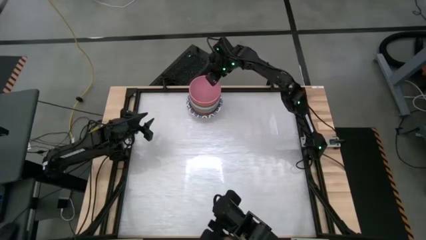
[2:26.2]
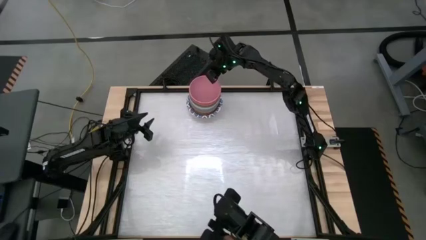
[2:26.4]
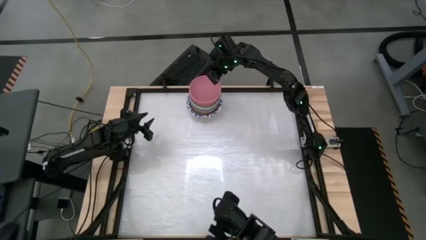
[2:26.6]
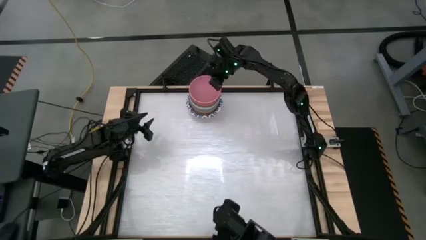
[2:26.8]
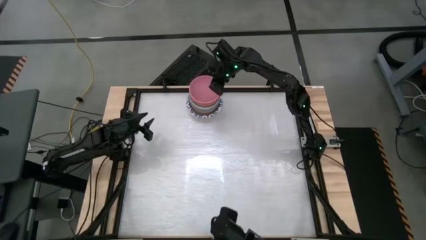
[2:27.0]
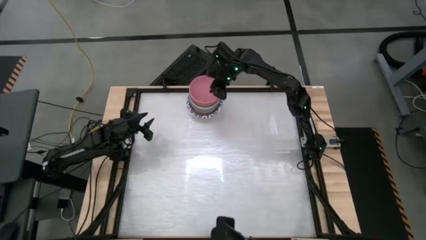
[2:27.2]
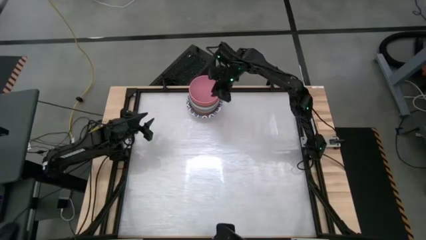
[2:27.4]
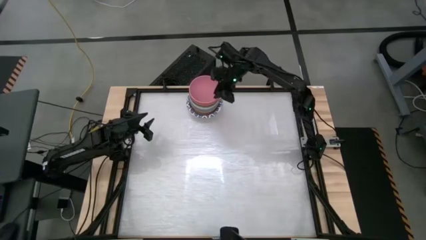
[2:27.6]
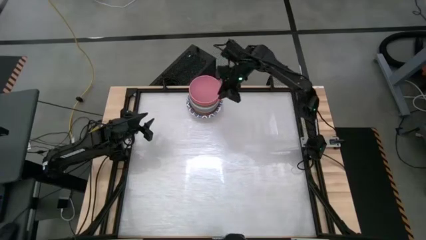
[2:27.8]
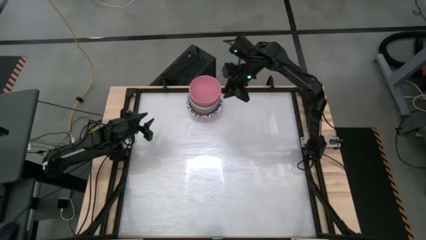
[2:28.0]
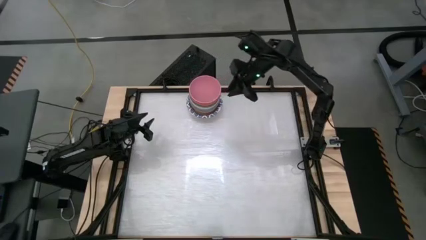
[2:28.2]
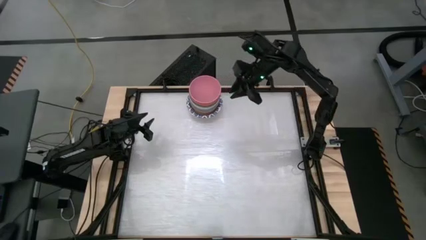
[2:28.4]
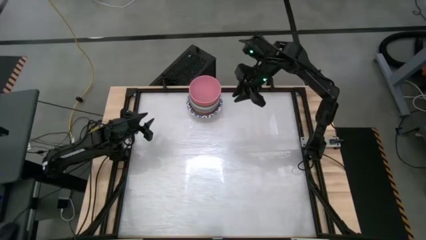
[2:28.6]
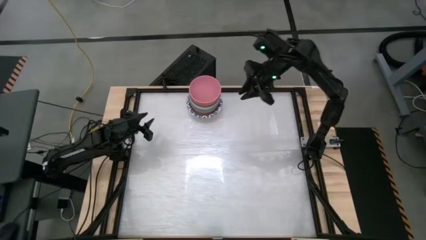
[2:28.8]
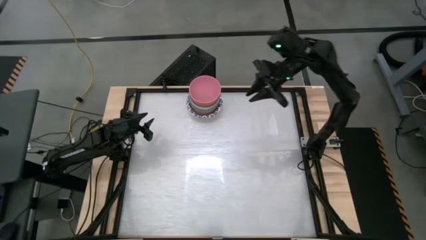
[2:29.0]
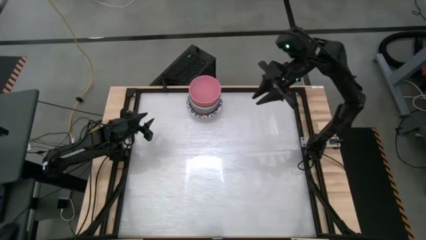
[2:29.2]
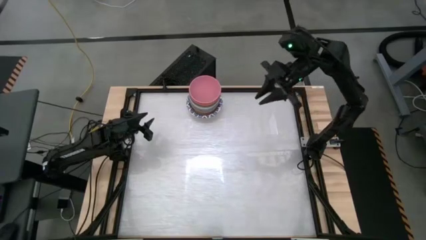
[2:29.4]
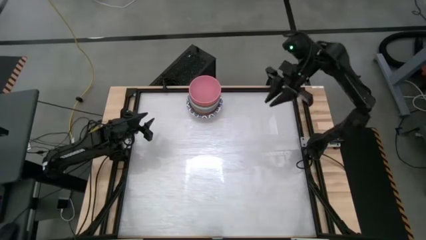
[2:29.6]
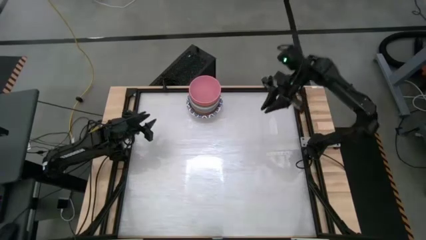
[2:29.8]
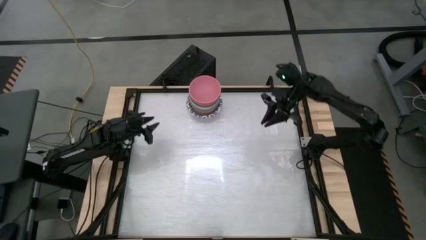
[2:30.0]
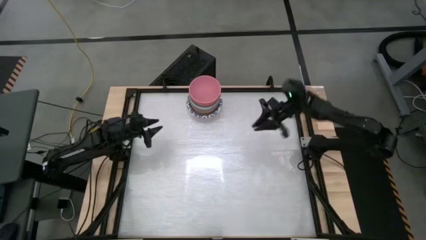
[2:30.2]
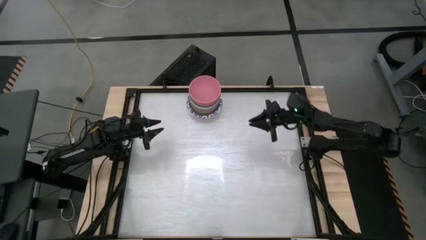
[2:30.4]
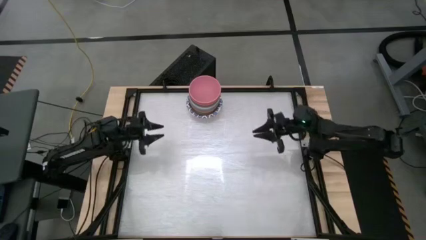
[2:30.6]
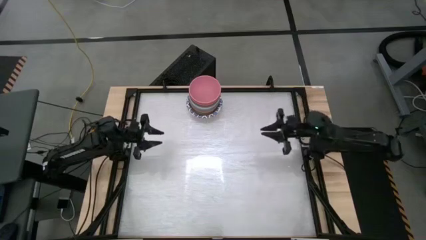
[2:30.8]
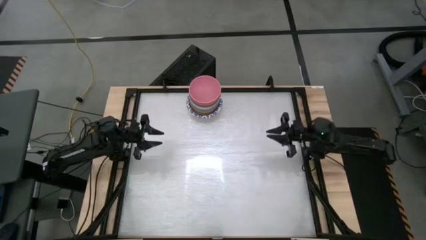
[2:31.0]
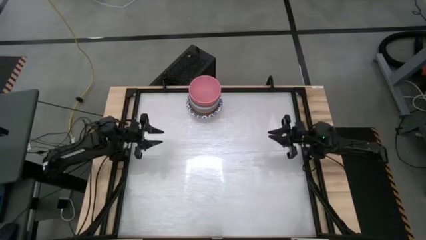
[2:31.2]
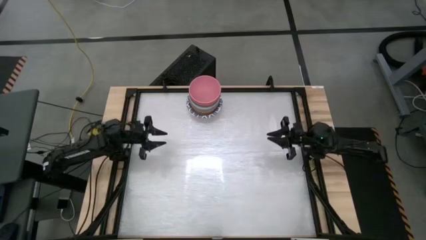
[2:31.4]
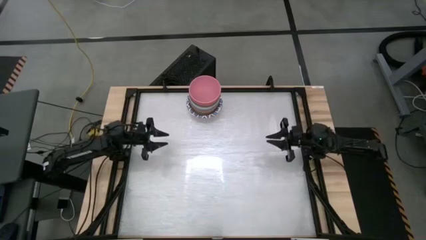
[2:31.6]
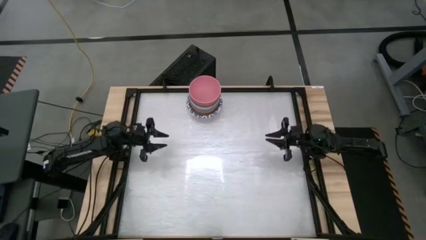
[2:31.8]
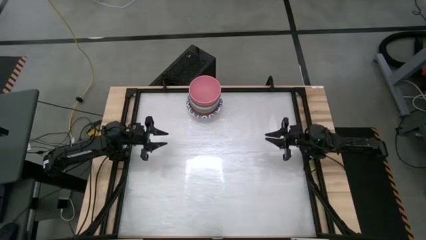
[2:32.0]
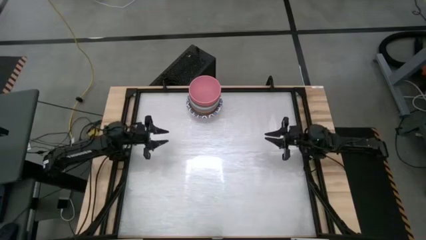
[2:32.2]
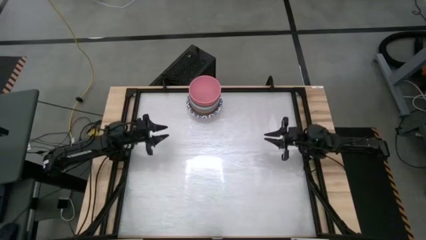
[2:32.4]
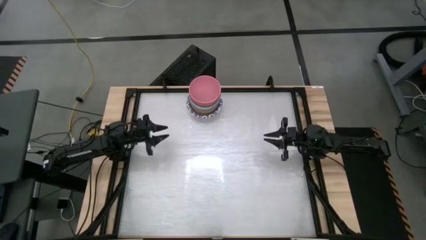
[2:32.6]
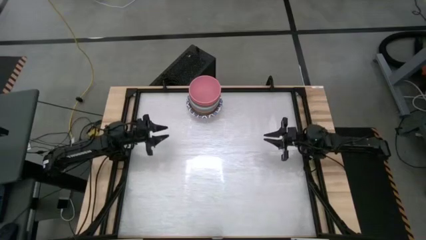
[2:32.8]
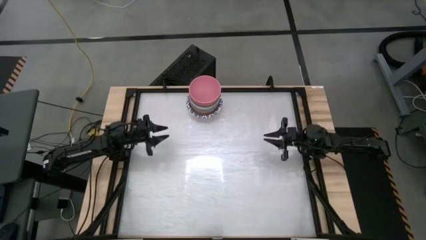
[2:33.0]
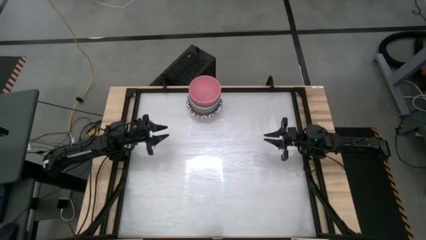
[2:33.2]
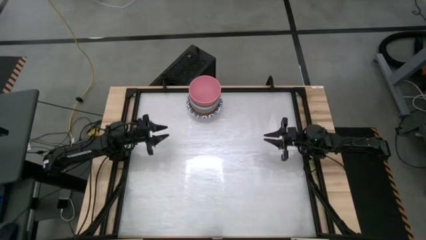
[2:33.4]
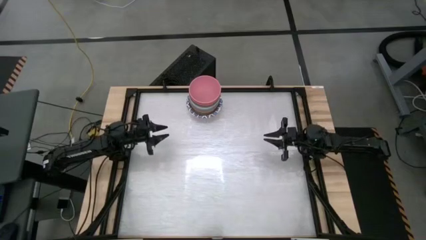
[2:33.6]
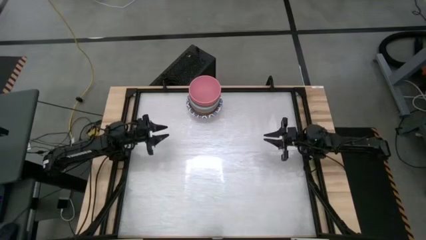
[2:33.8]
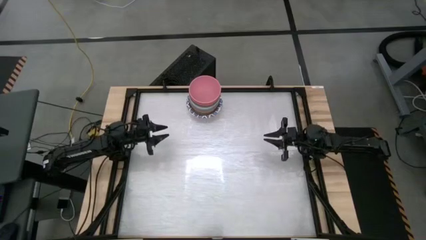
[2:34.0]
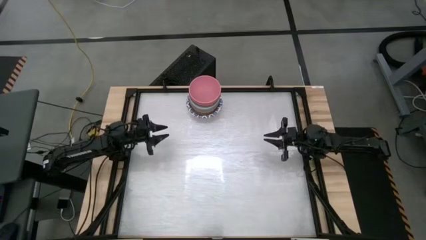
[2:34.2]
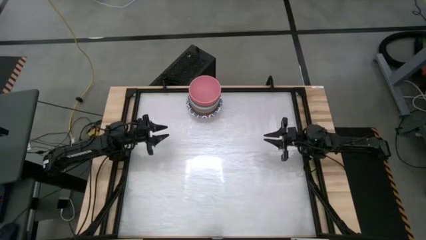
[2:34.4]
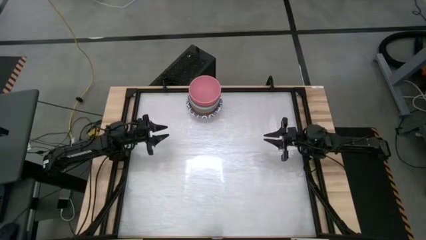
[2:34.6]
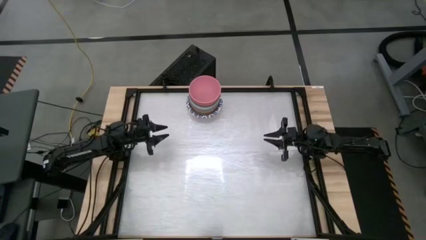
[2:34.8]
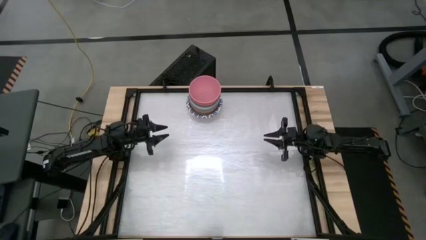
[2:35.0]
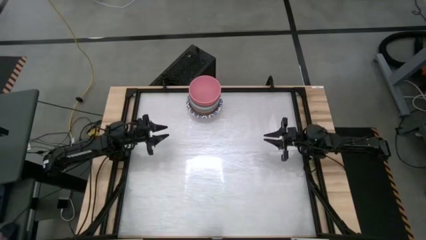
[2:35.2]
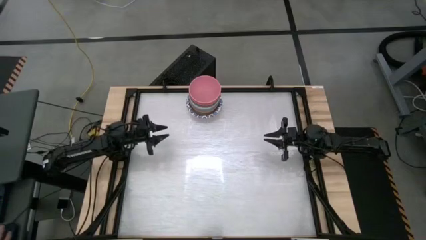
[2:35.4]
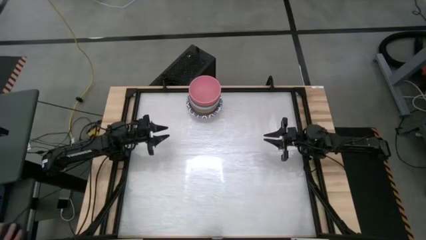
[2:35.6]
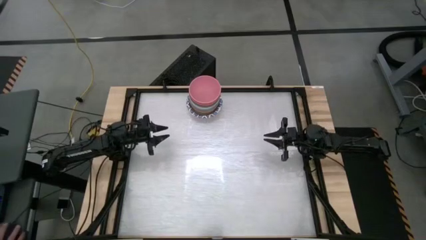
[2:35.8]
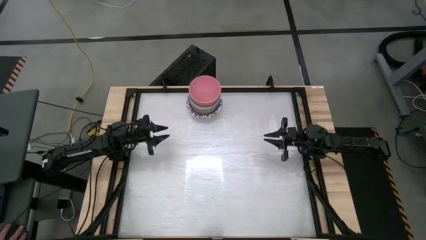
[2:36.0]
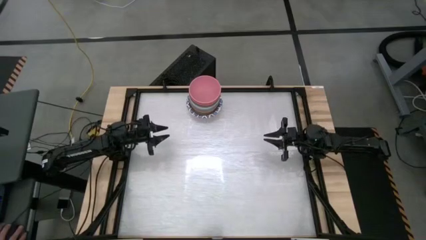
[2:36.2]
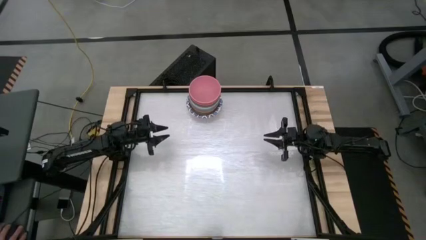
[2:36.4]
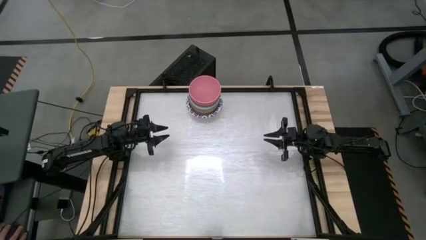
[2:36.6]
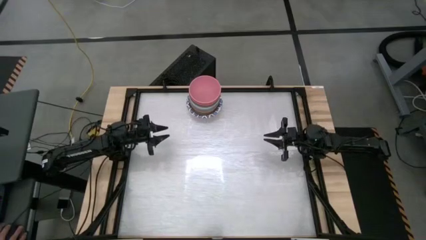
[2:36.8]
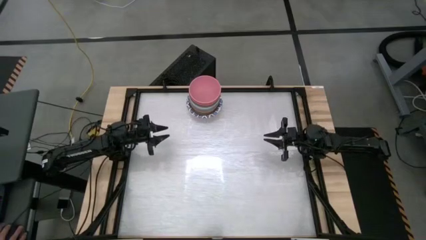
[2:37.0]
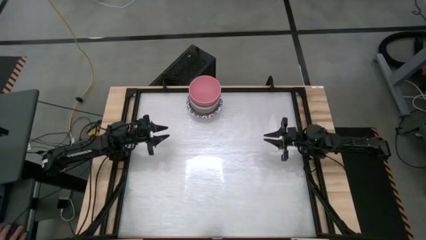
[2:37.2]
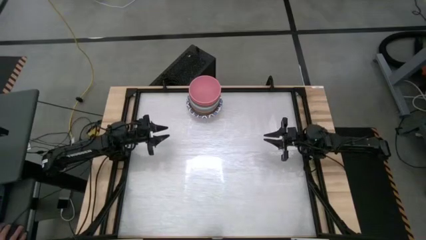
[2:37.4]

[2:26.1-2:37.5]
Return to Home Position
